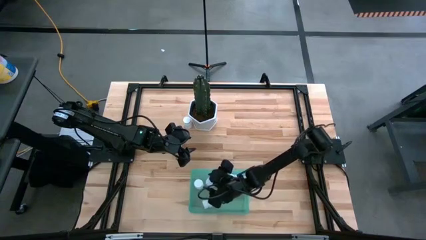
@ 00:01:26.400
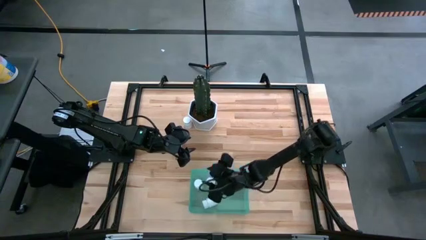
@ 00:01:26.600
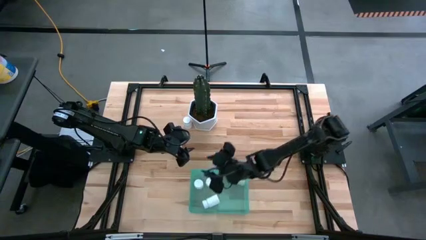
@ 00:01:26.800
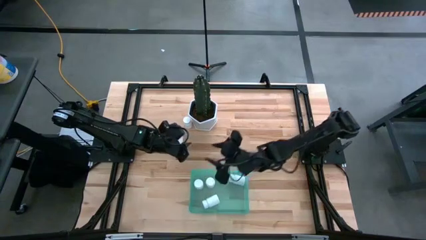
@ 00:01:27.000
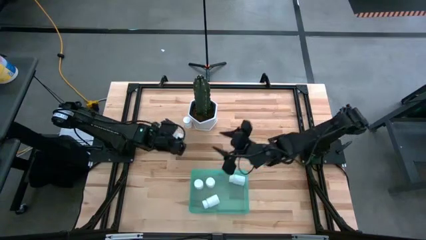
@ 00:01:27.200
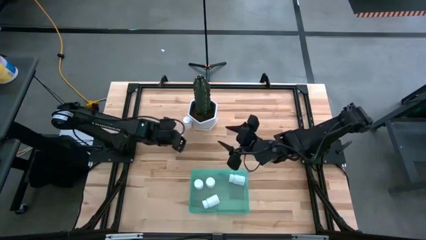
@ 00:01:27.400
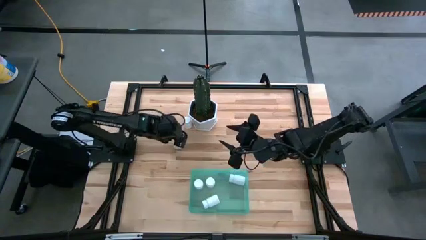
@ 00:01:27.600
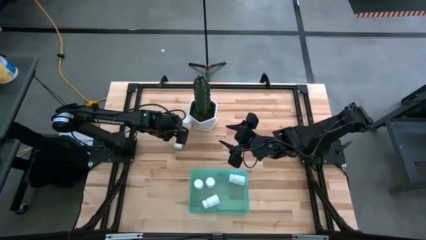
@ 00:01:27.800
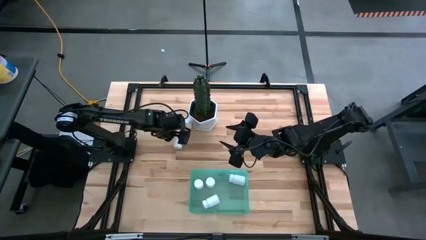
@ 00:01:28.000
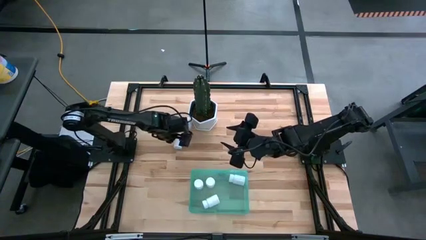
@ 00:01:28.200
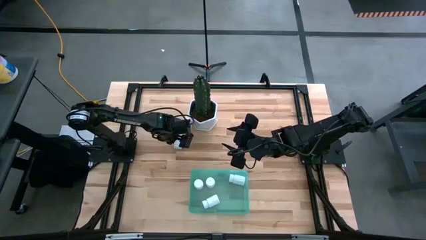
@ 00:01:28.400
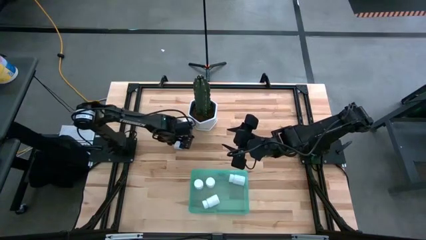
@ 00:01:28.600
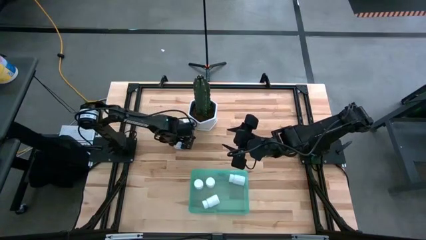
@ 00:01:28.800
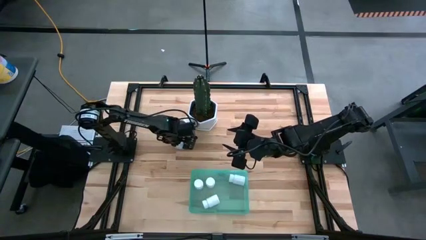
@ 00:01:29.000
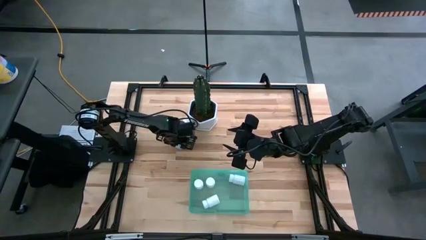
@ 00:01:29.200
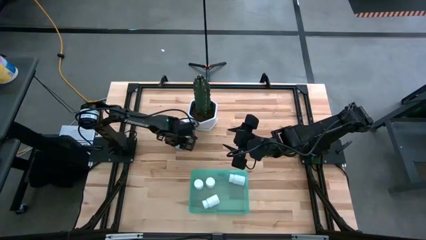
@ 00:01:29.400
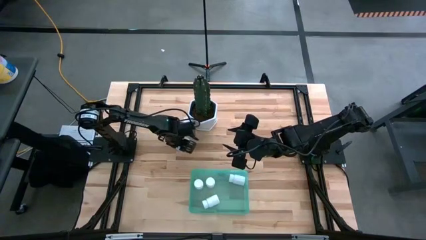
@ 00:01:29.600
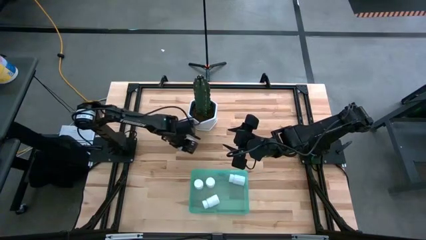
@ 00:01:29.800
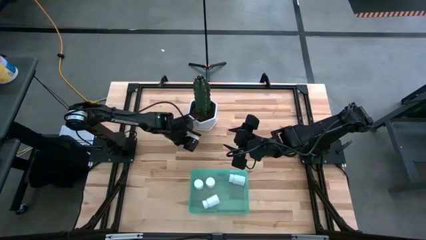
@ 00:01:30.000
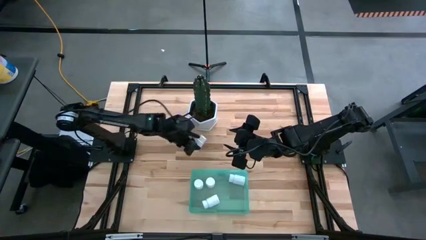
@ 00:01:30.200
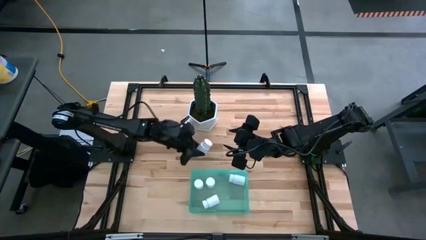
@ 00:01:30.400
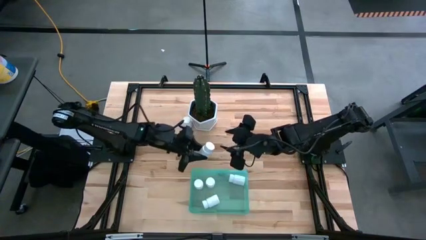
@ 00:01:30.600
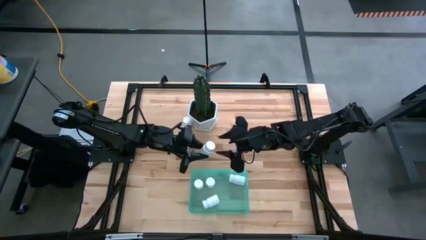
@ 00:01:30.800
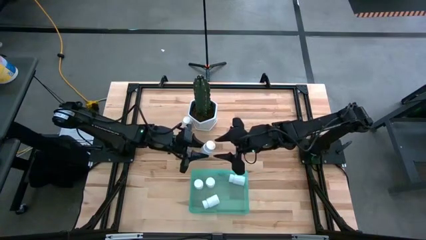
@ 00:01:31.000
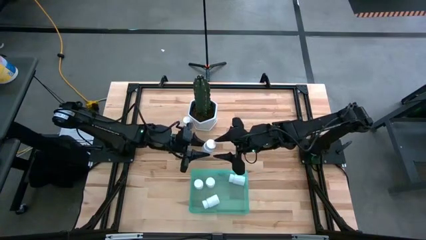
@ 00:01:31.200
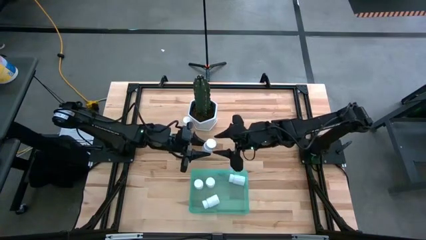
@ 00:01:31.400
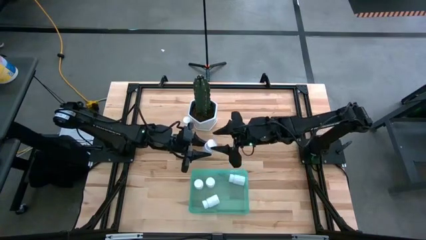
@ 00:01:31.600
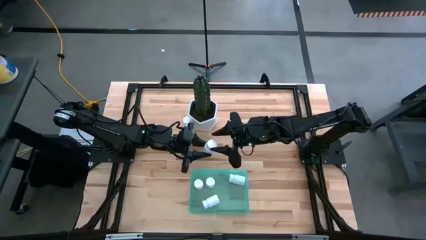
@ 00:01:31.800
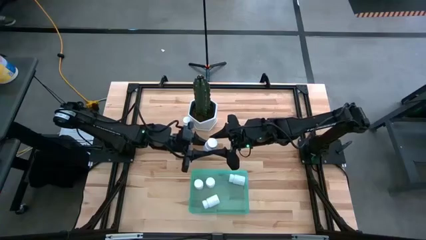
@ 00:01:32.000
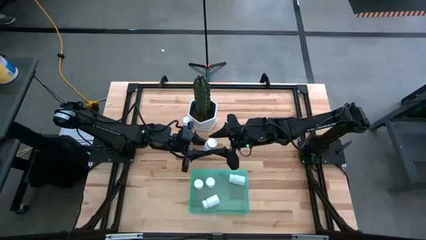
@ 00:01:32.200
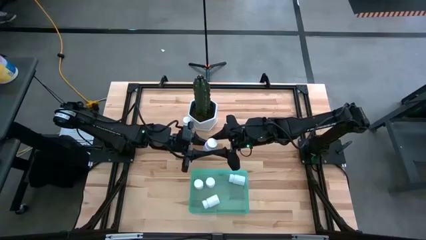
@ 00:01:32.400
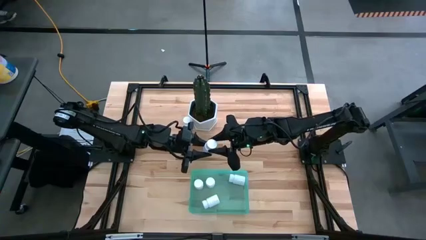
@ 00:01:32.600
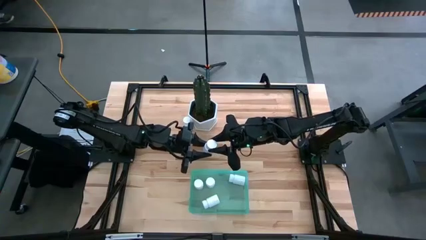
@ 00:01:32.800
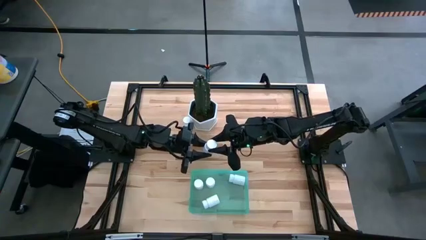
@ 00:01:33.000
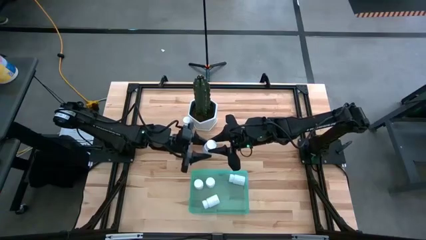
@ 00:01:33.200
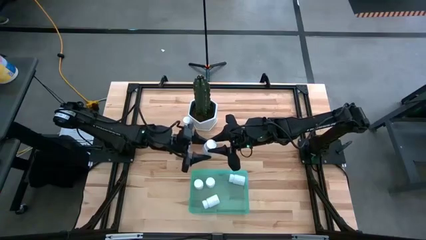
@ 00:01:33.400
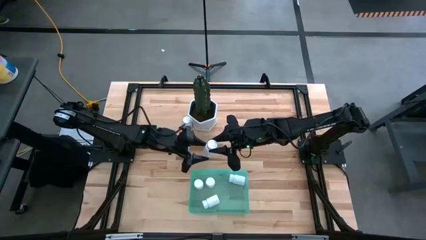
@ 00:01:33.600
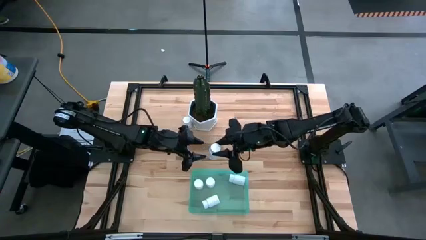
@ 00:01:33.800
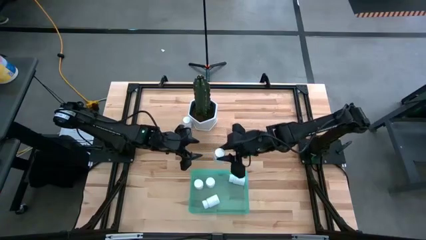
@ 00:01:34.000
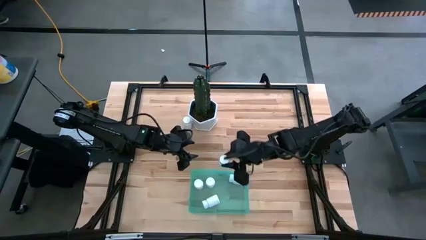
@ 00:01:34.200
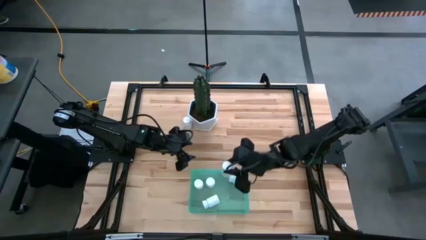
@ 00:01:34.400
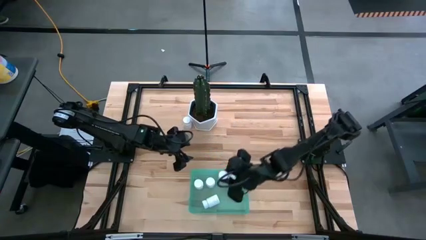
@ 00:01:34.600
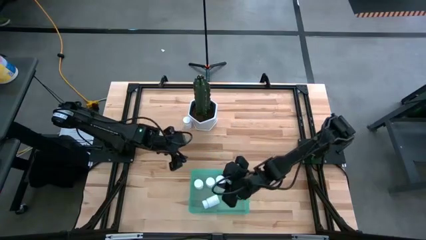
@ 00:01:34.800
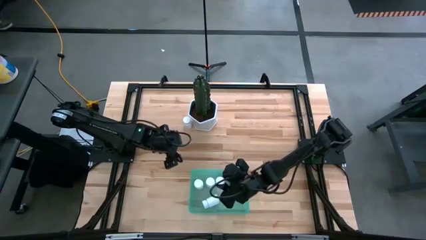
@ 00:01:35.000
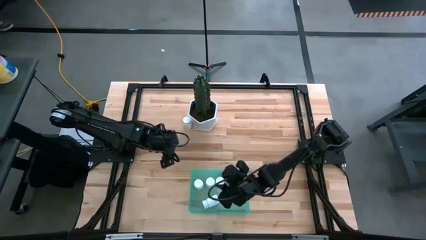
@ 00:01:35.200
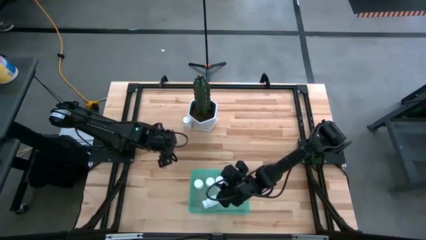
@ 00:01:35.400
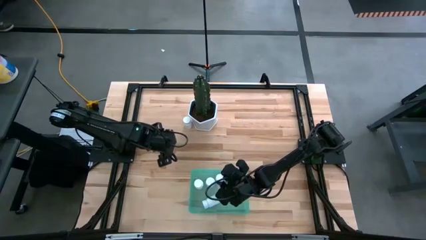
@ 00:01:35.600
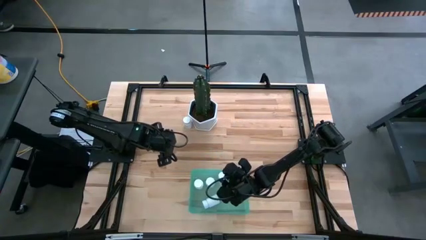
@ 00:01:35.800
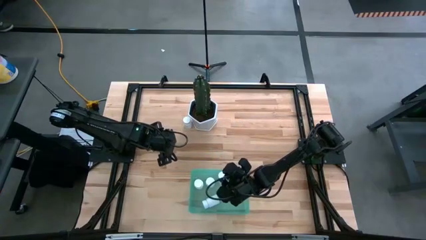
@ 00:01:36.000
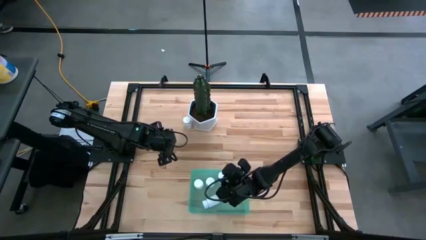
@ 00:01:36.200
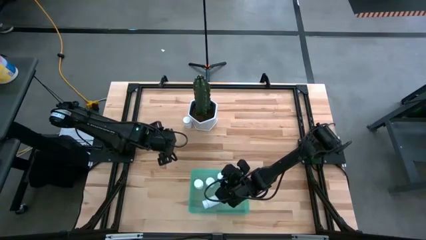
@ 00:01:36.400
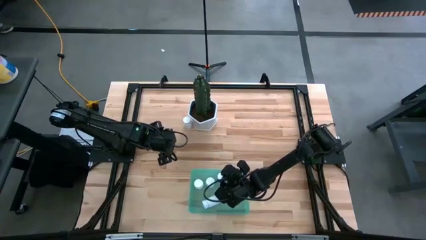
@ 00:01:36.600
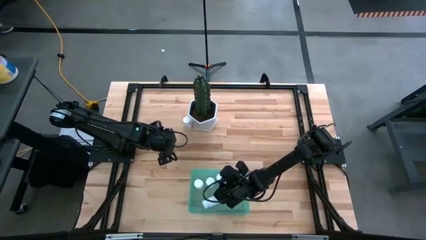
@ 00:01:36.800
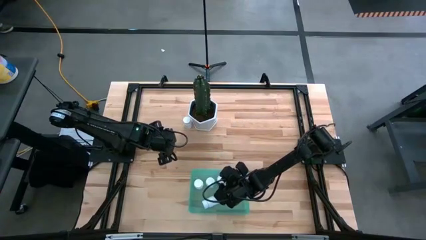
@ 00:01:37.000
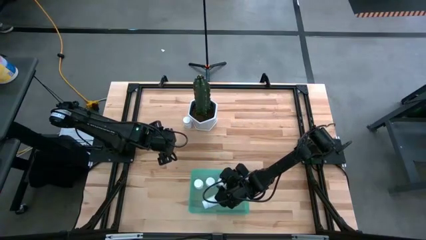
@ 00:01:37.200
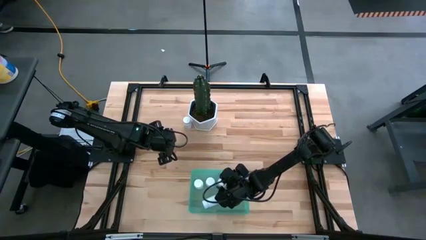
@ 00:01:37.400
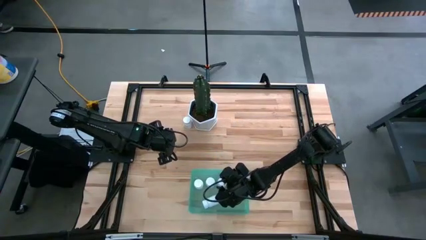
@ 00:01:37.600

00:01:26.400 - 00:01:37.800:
Task: Pick and place pill bottles into a basket
Put the white pill bottle into the green bin
